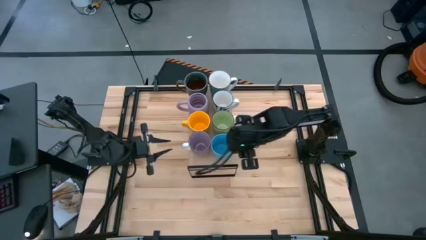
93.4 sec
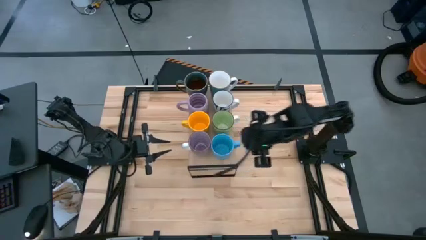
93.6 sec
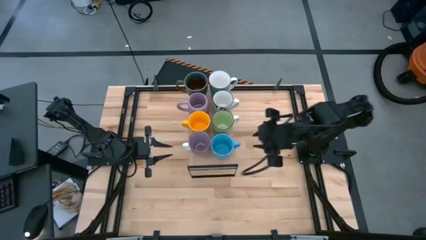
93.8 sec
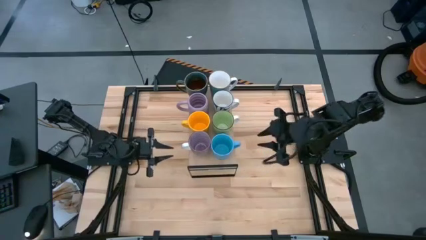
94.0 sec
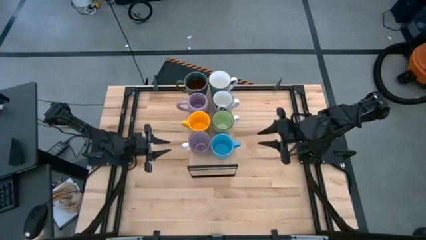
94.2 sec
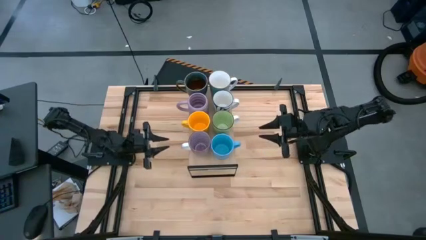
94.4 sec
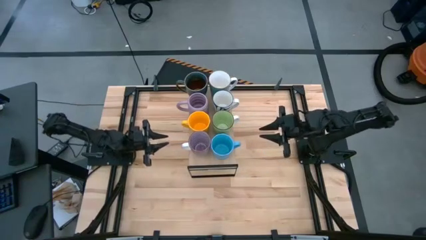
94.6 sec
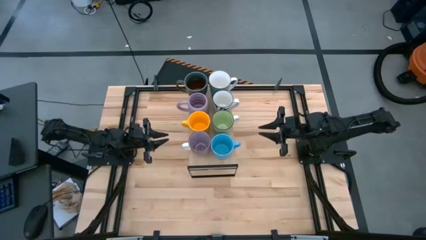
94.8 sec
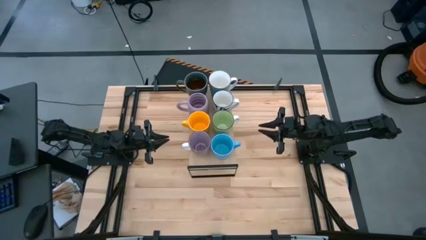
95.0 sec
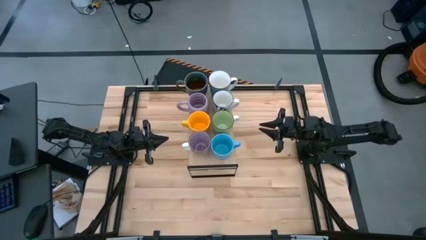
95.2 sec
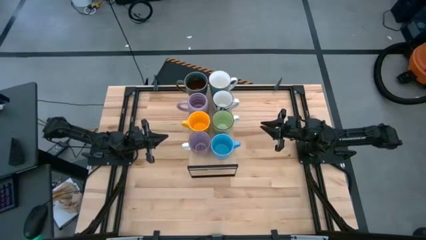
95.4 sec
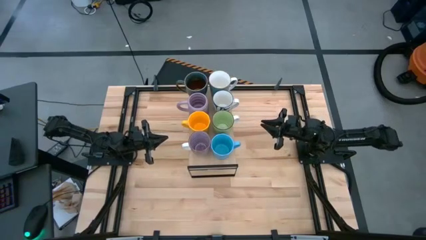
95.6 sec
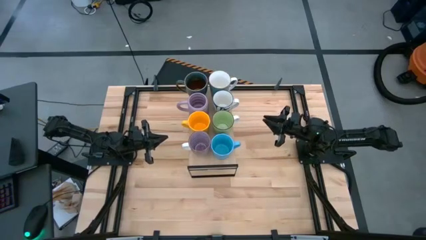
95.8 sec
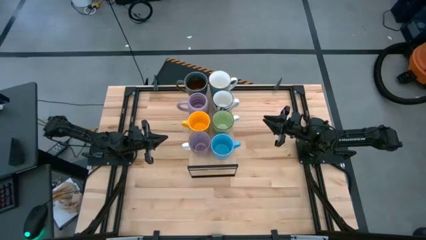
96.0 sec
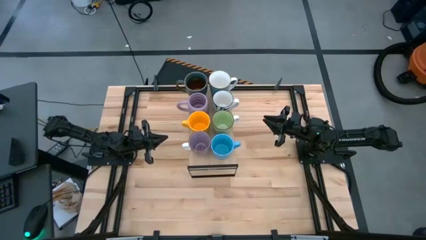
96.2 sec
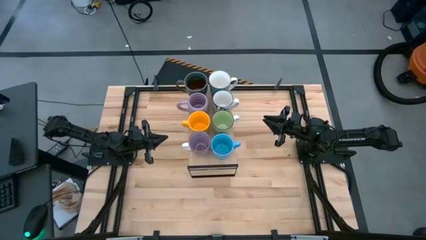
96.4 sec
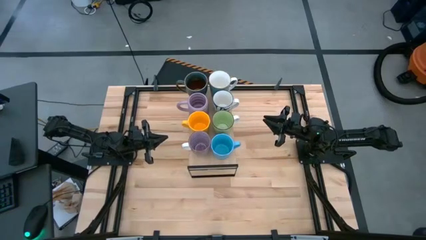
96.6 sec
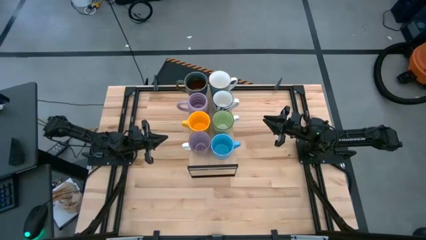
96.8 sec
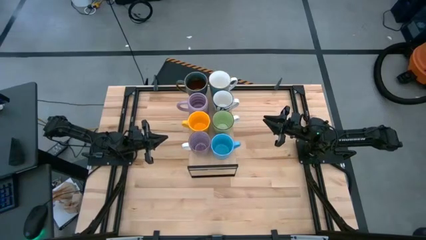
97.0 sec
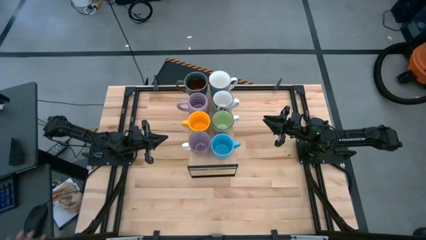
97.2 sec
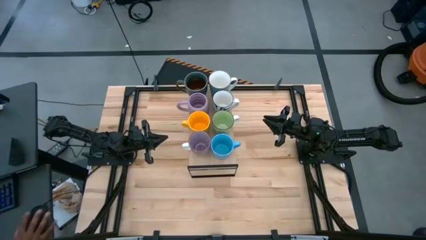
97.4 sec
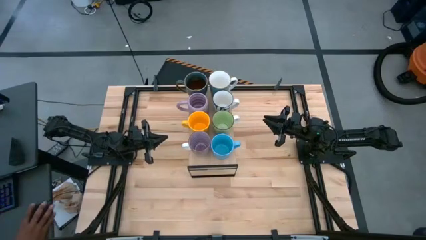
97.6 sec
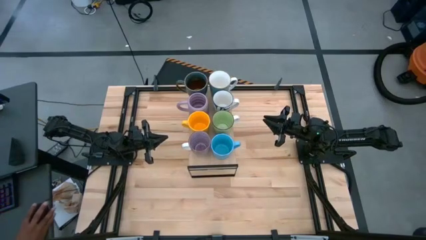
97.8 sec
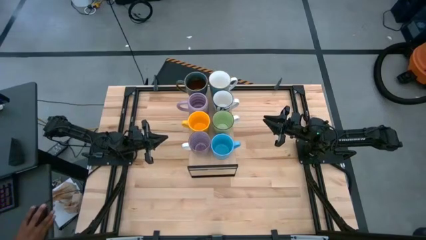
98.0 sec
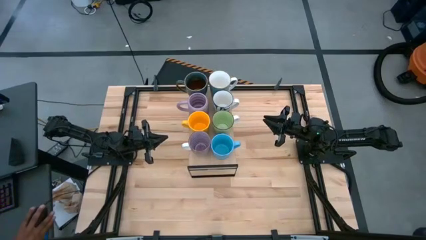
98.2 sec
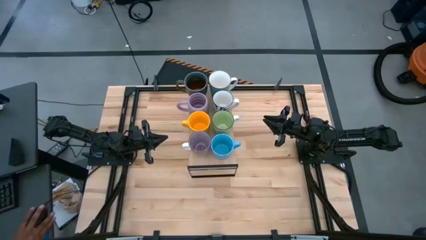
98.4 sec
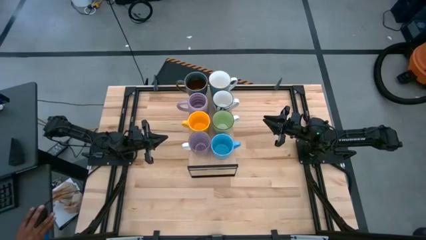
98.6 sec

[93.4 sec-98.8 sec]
Task: Place coffee mugs
Return to Home Position

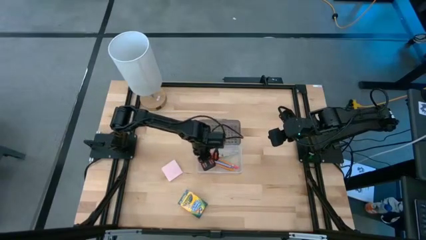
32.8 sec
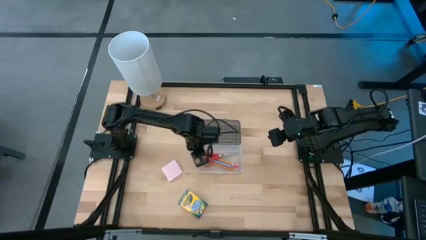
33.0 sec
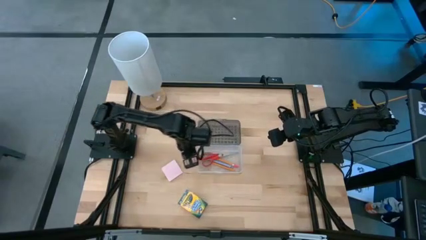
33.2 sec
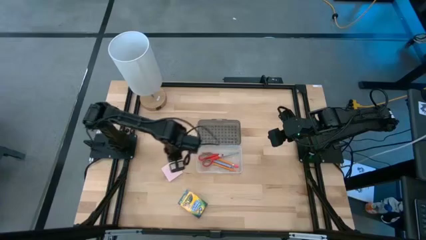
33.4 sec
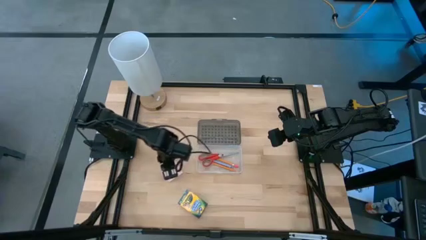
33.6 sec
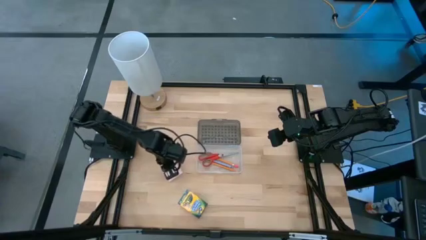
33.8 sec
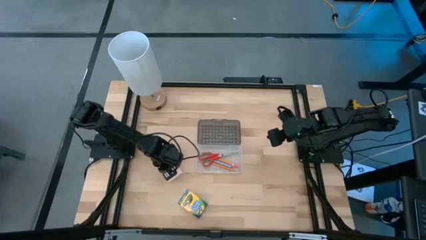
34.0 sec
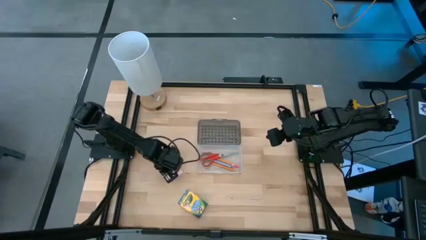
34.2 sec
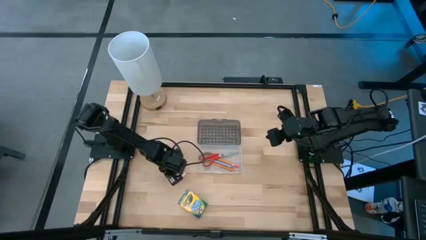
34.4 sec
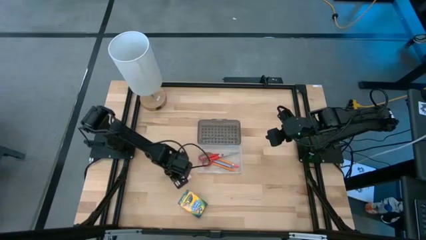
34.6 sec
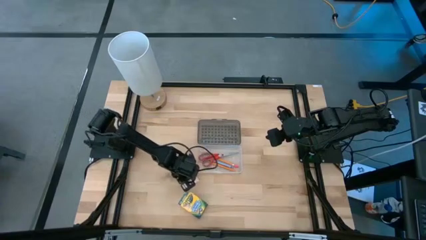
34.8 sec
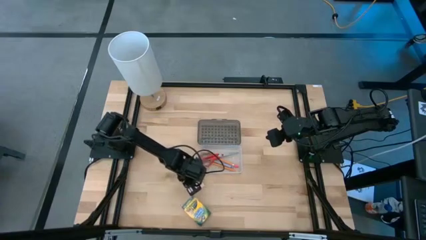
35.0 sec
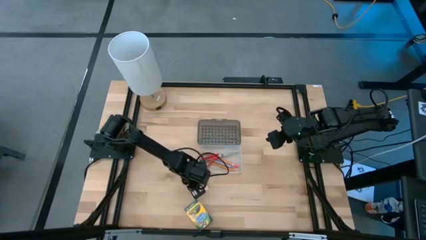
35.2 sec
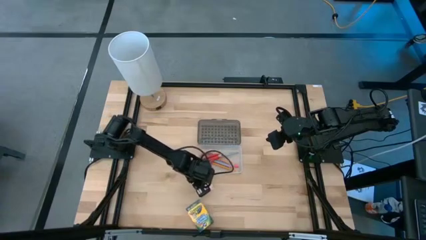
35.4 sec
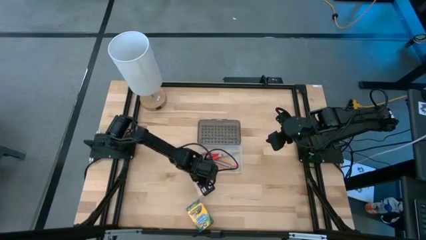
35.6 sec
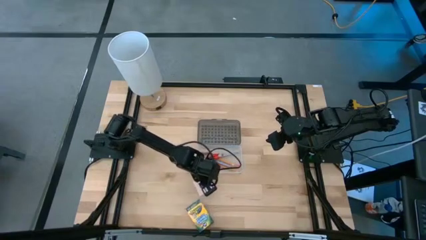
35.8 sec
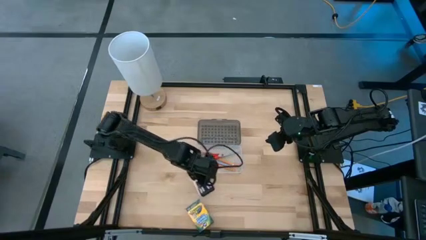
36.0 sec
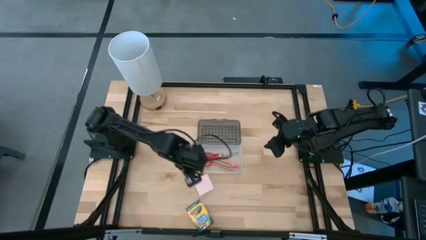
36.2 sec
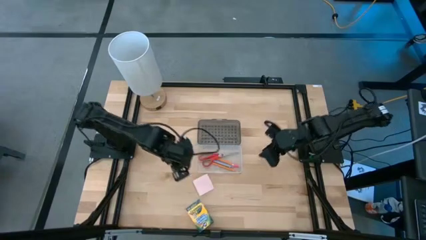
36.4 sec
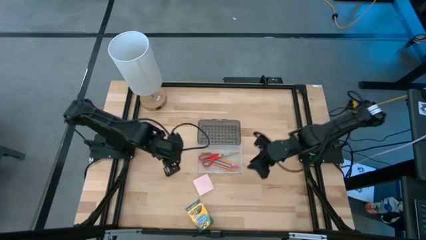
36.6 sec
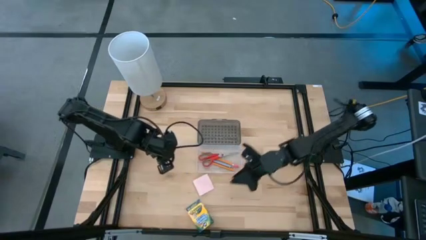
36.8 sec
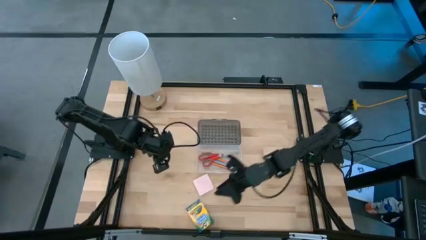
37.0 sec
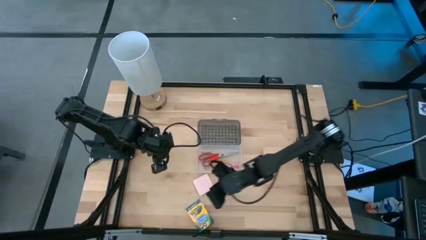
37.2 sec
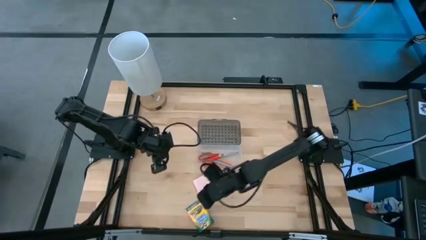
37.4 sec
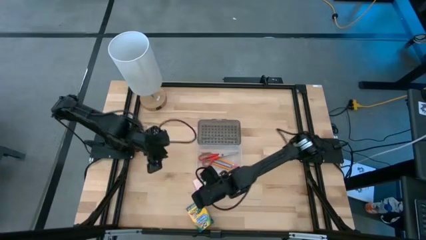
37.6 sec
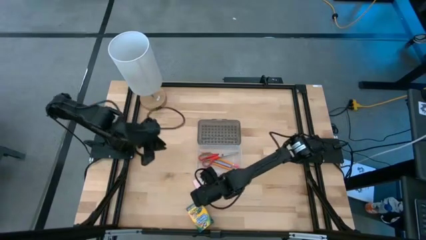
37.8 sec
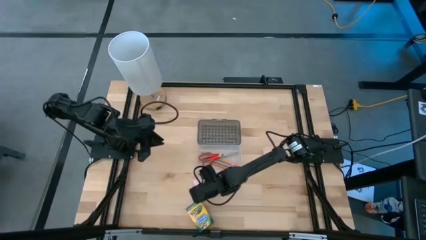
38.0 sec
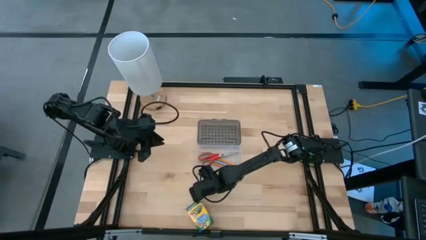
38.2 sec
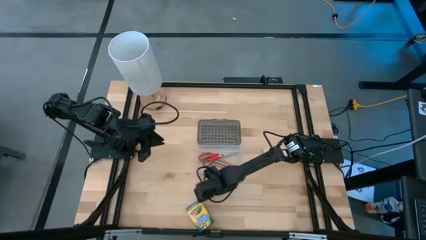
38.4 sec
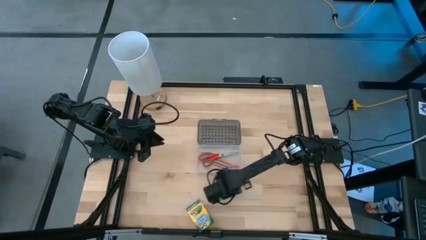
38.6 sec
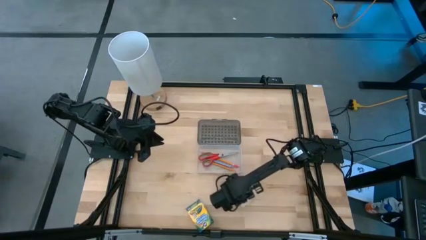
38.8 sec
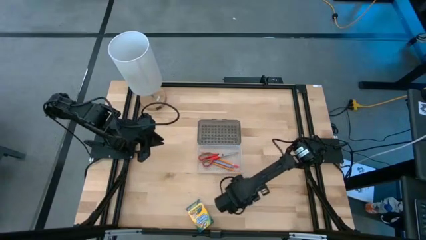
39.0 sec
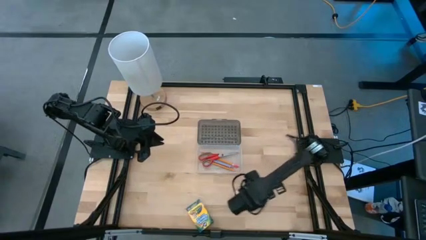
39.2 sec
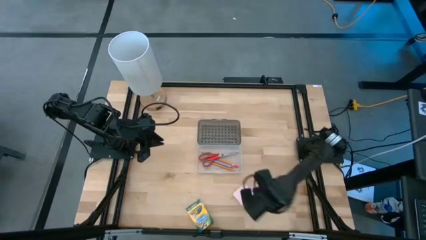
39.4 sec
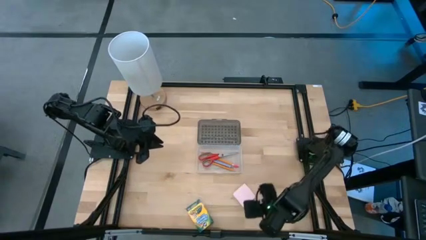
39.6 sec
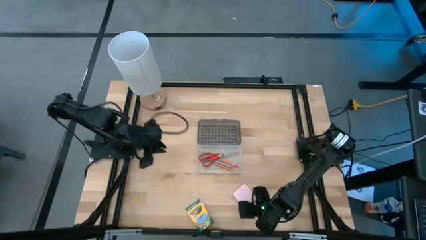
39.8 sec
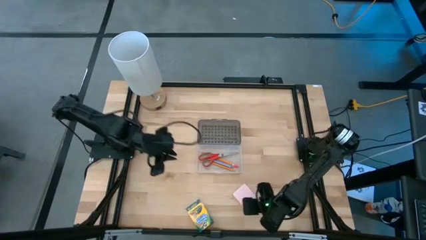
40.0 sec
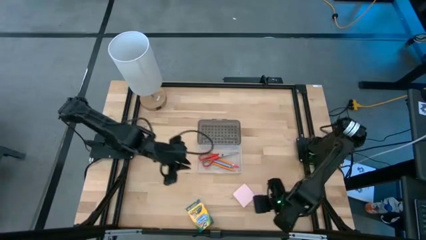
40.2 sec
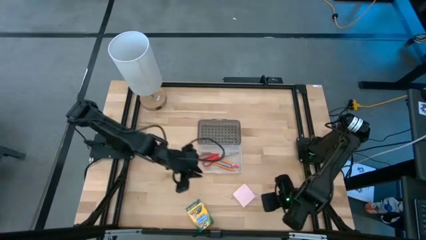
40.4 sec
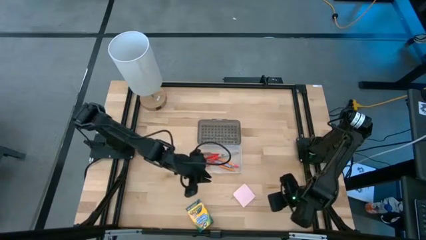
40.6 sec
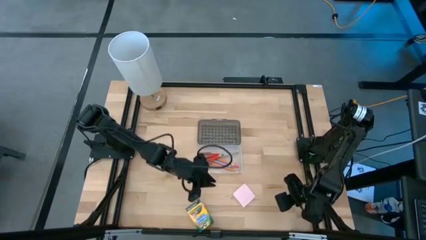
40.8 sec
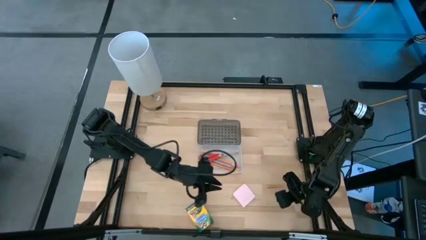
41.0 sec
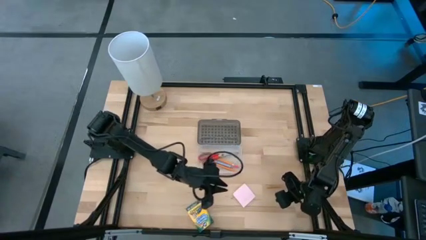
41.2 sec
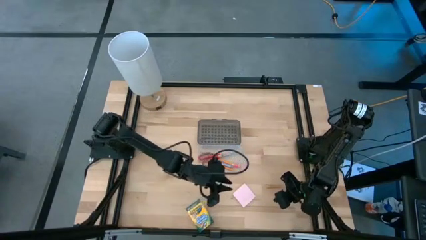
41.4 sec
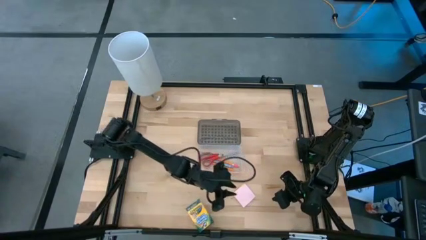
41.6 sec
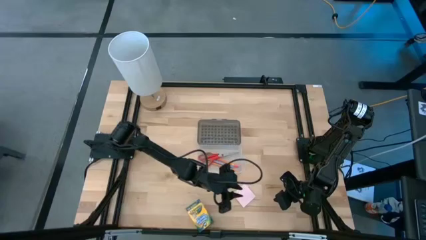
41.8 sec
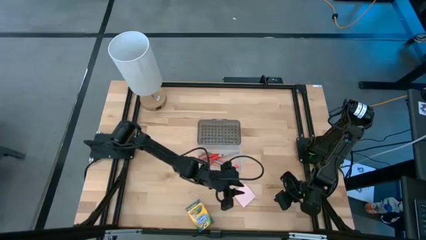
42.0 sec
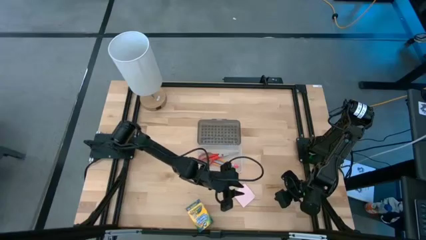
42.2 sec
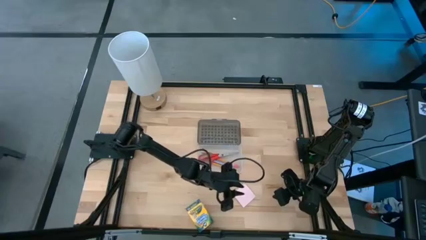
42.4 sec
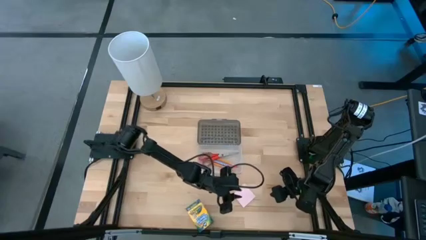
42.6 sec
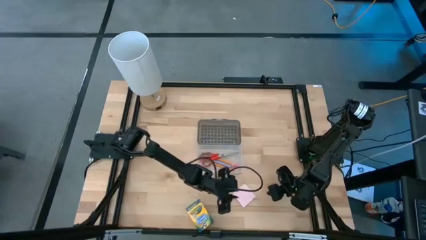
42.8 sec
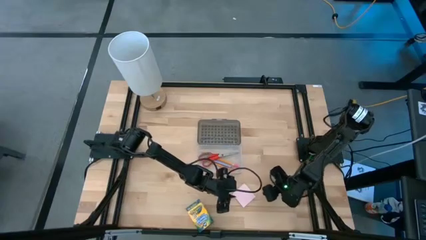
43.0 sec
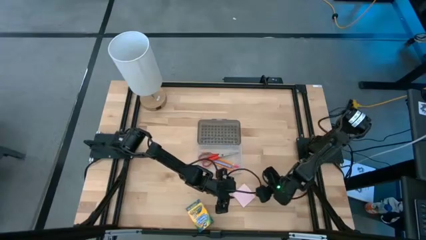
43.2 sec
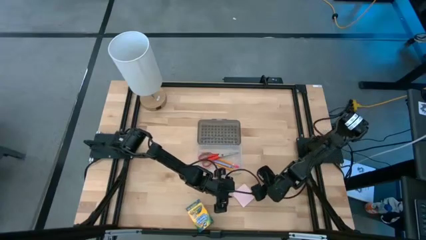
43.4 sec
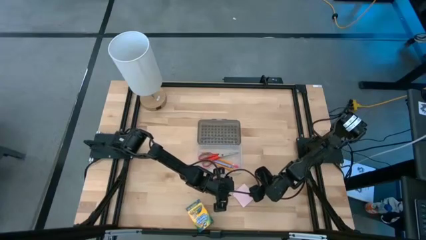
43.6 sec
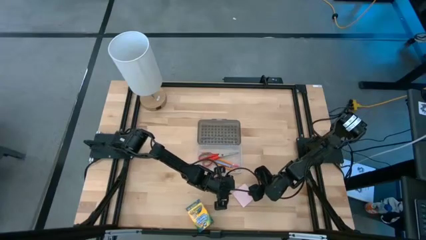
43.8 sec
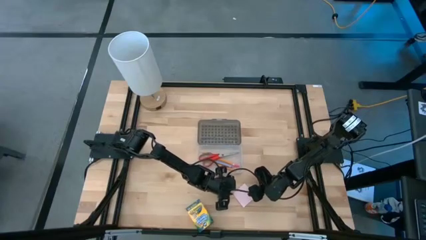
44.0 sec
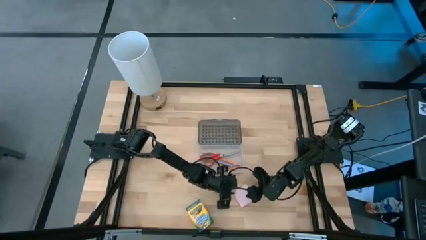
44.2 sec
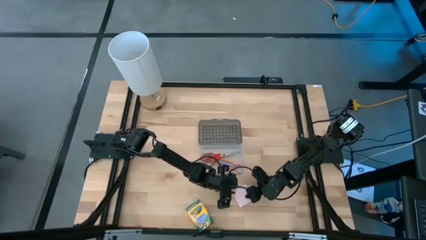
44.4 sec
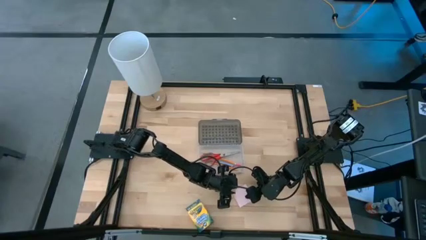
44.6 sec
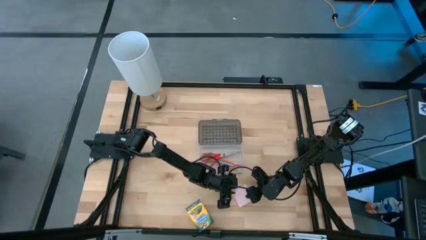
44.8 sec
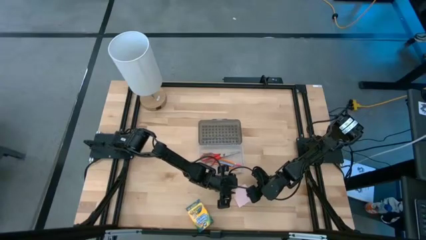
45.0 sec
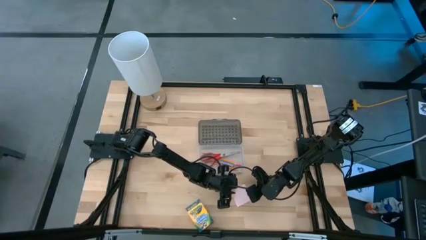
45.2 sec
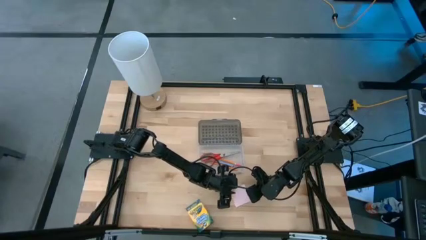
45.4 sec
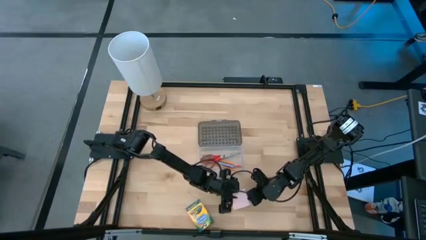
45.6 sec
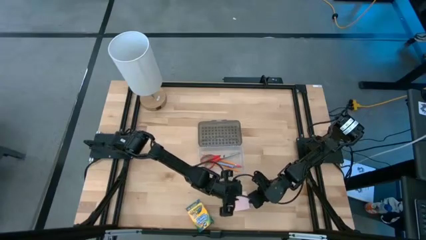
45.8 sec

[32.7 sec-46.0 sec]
Task: Pack school essentials
Put the light pink sticky notes into the transparent supply box
